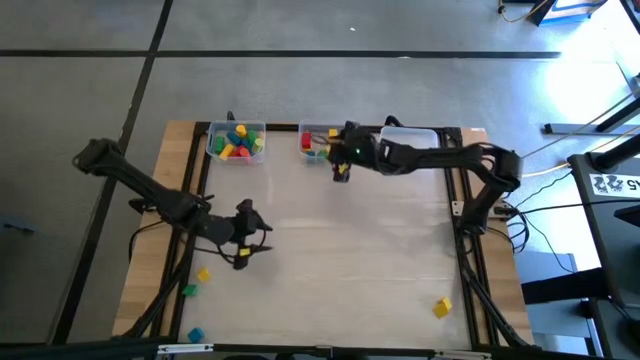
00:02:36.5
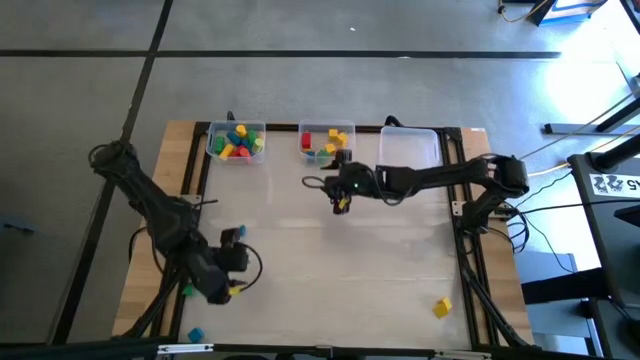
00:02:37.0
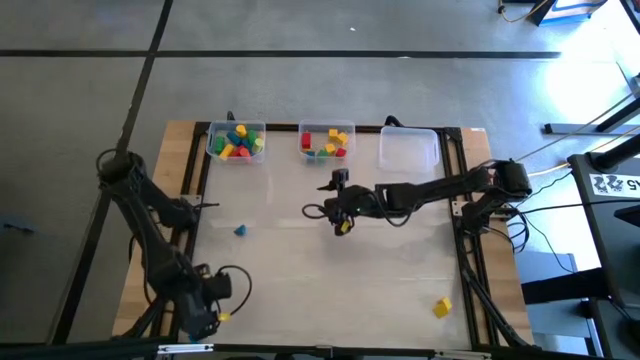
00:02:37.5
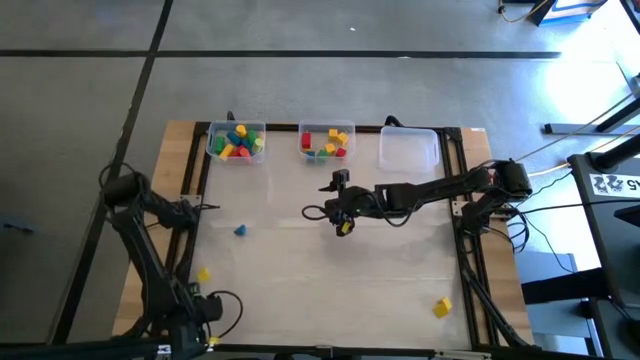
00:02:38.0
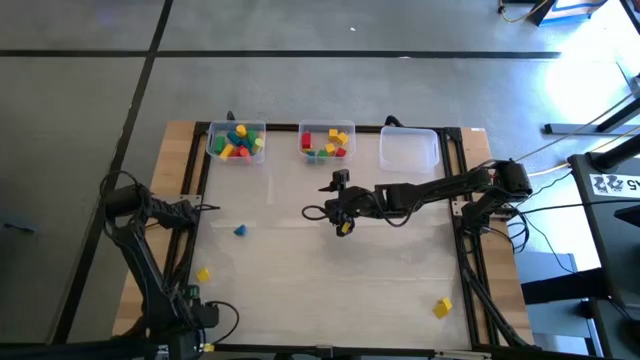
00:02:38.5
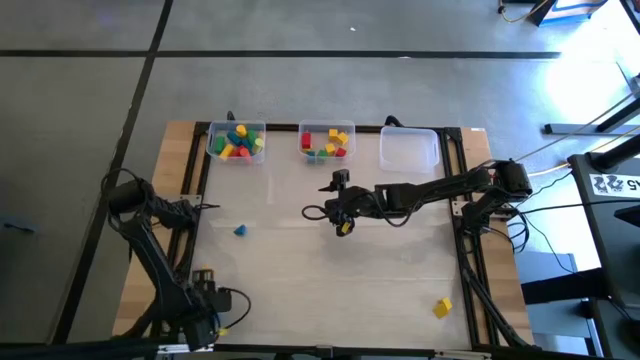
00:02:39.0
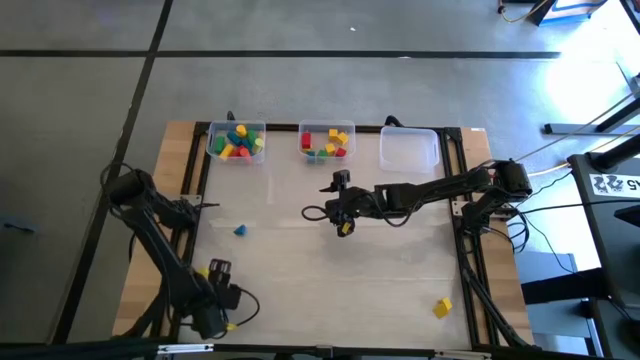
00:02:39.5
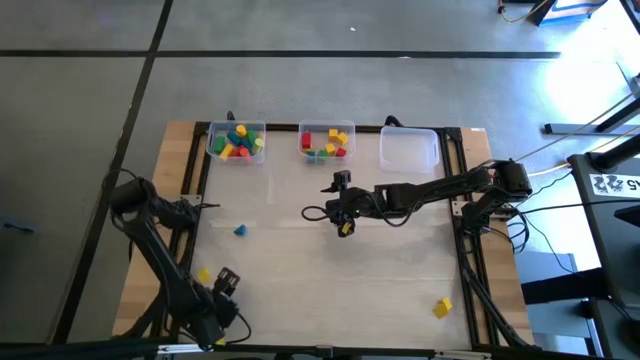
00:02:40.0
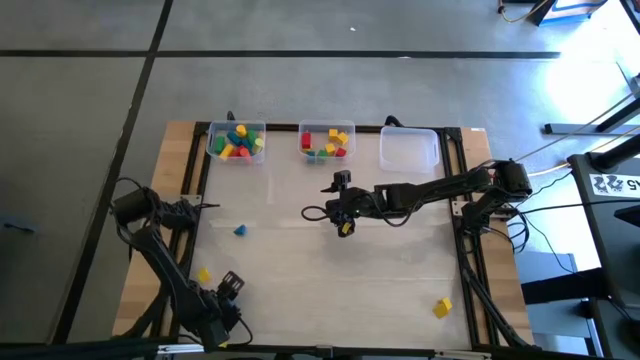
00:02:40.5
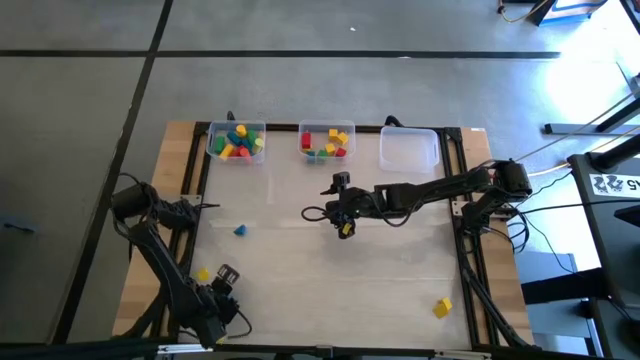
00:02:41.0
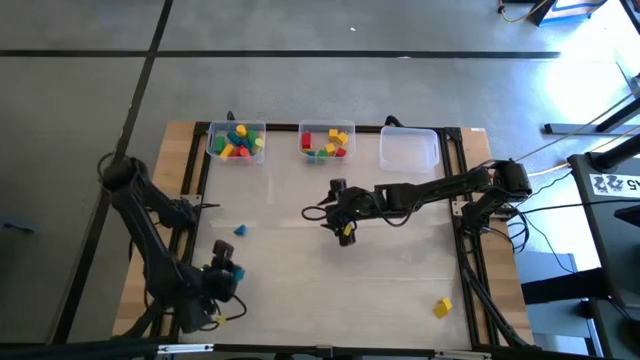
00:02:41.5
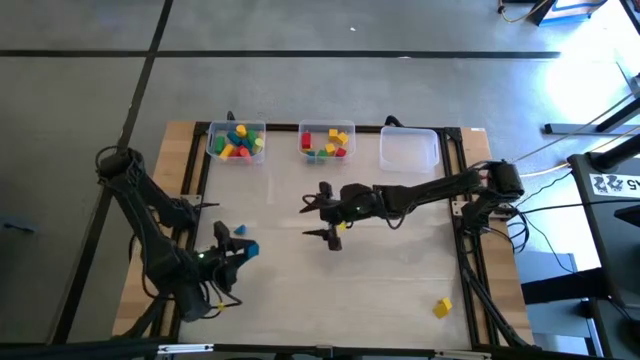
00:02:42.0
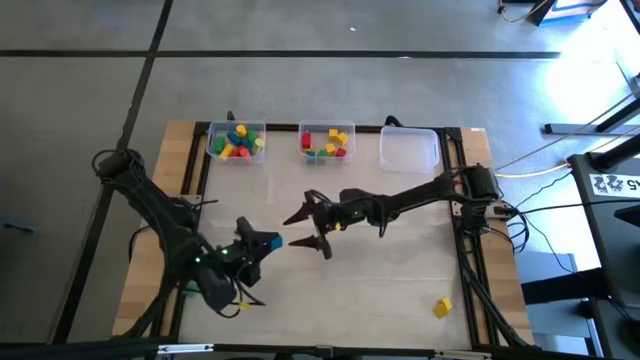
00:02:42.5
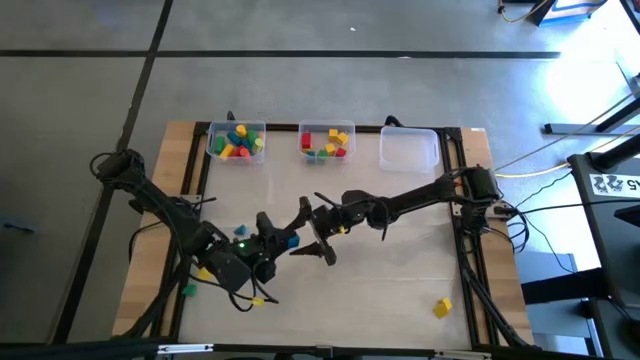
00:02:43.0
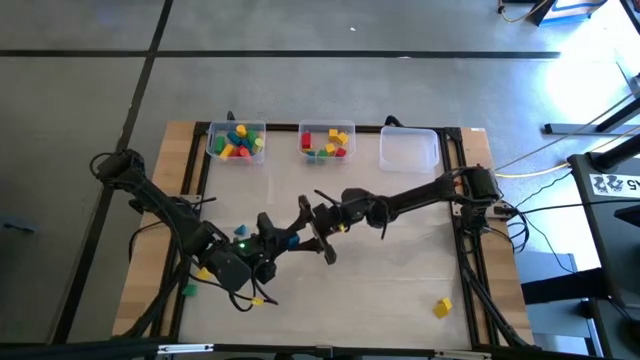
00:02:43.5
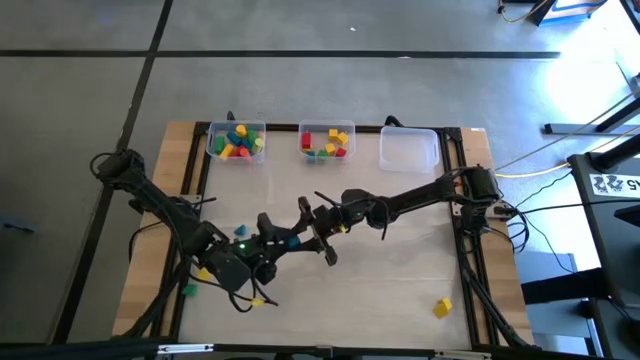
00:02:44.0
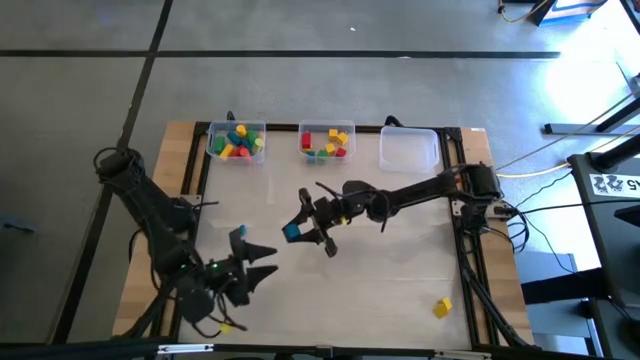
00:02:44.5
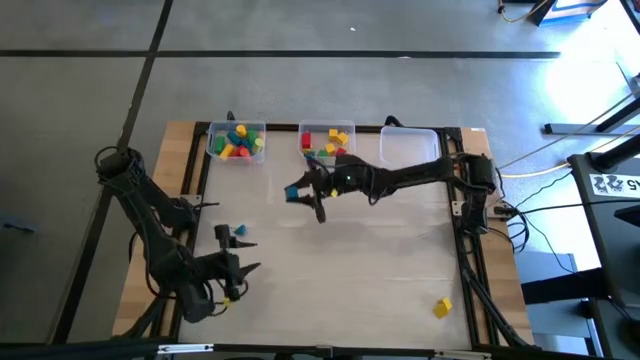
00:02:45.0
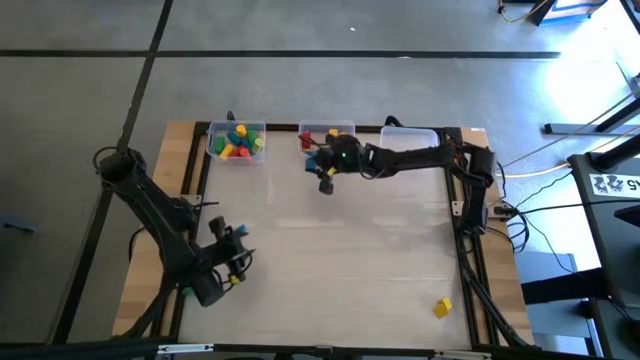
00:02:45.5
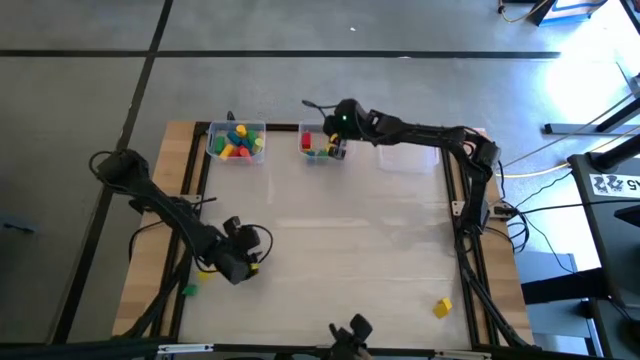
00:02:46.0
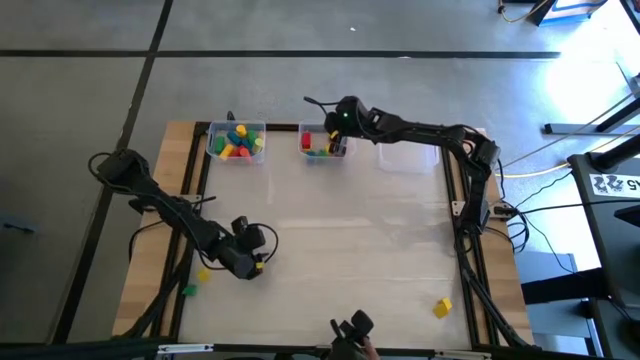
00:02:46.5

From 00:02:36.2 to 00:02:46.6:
Task: Sort blocks by size
Put the square blue block into the middle transparent bin

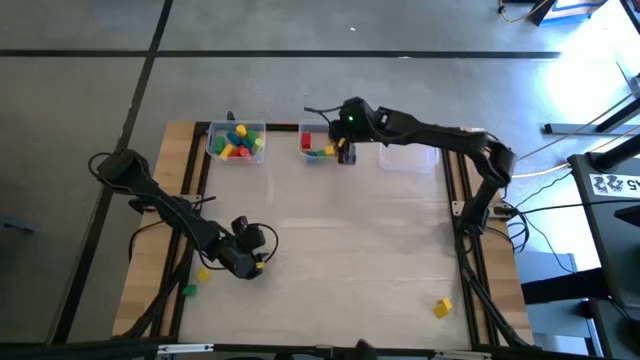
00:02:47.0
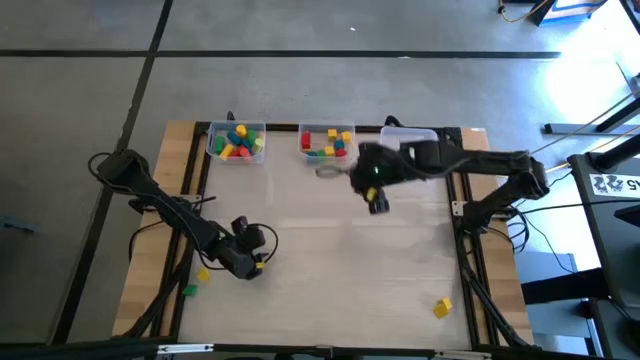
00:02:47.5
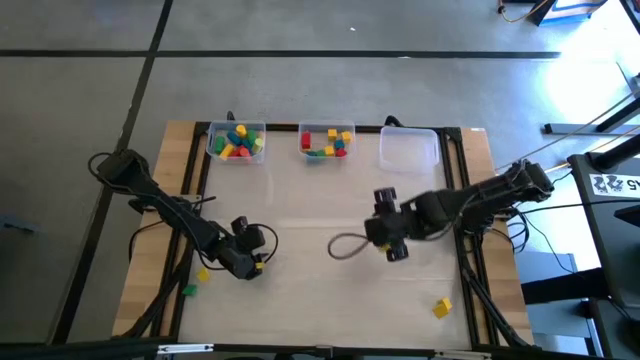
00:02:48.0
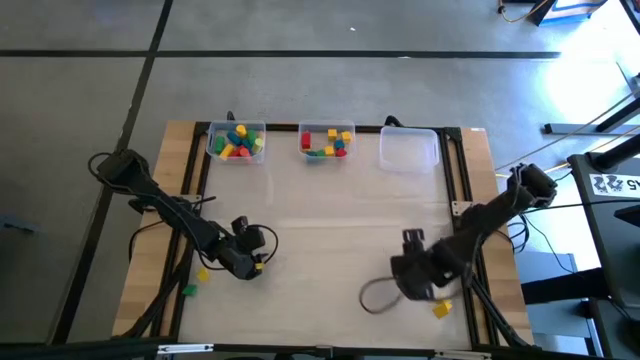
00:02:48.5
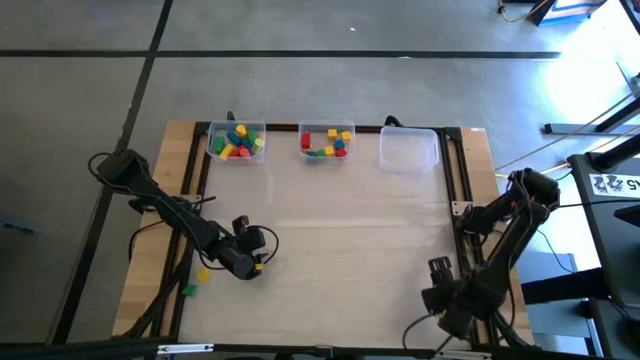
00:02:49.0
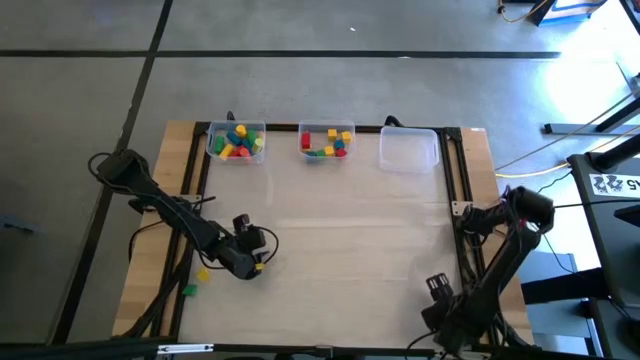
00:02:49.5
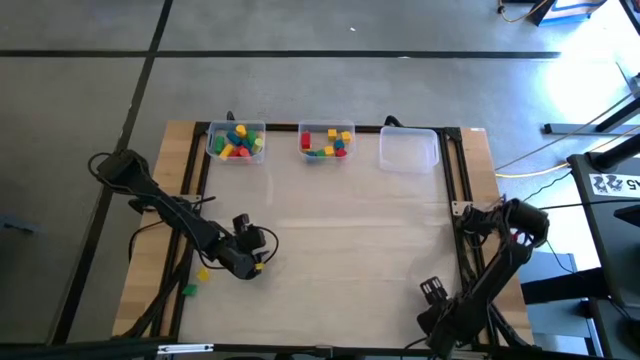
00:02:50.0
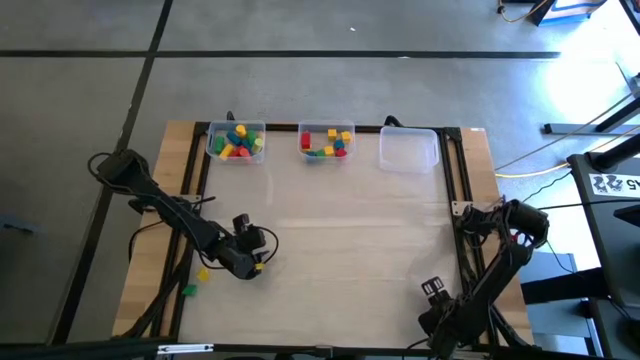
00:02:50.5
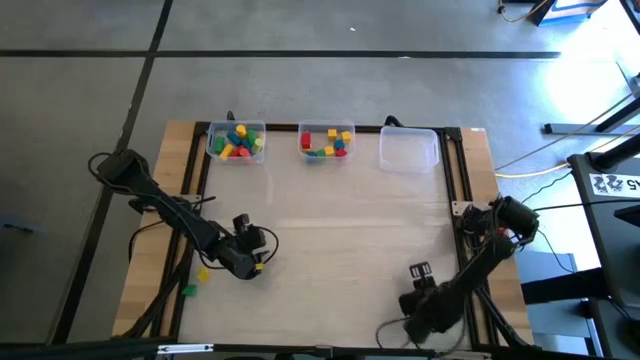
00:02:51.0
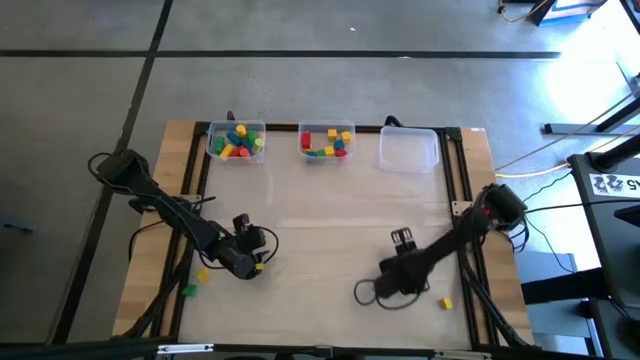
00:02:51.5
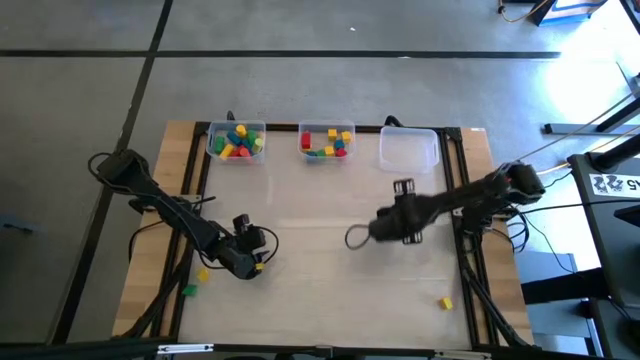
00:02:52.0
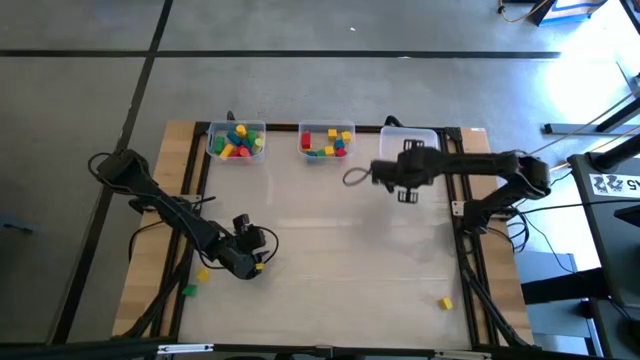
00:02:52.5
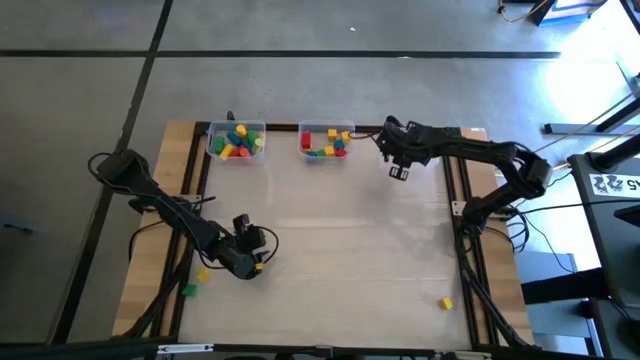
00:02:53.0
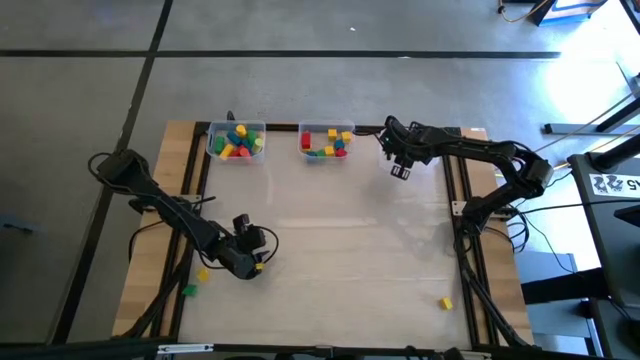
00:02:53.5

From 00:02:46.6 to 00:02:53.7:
Put the triangular yellow block into the right bin

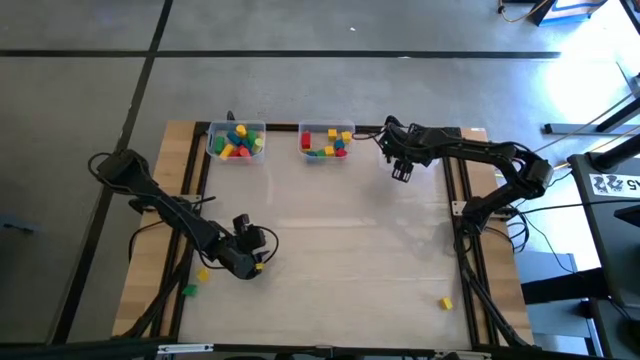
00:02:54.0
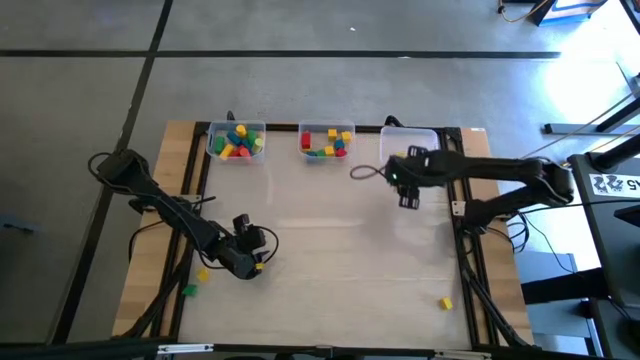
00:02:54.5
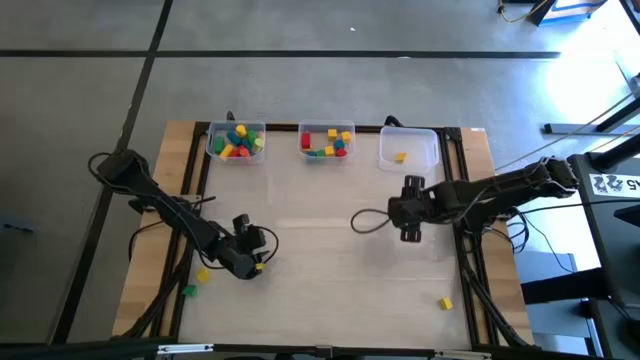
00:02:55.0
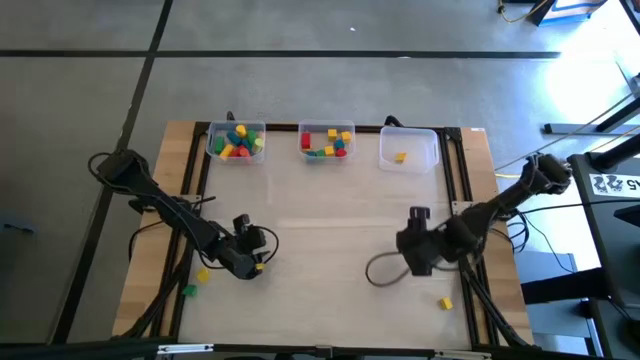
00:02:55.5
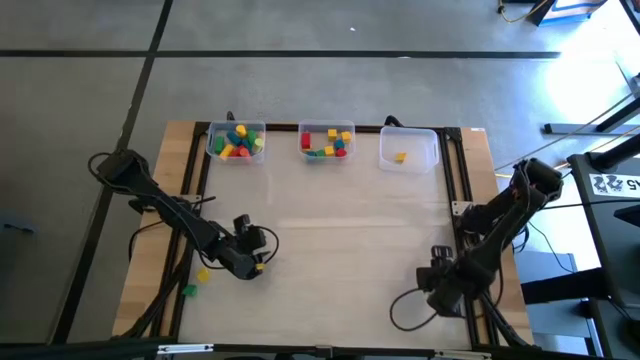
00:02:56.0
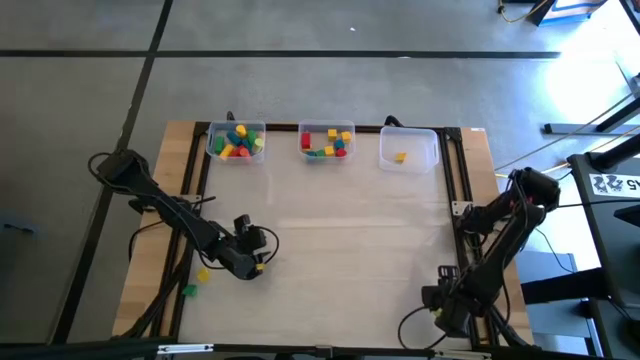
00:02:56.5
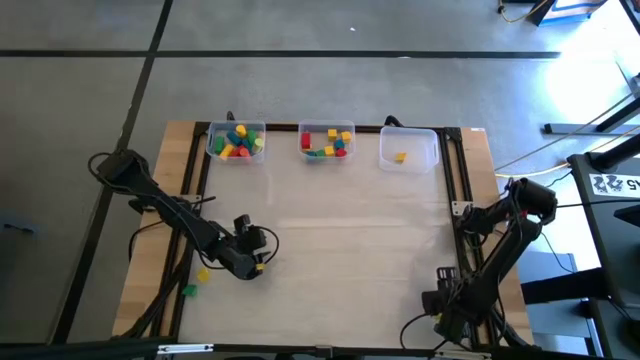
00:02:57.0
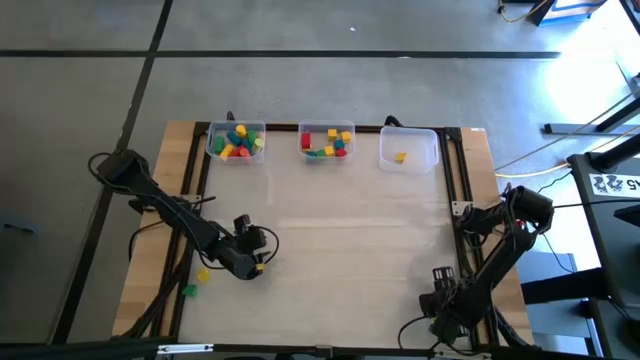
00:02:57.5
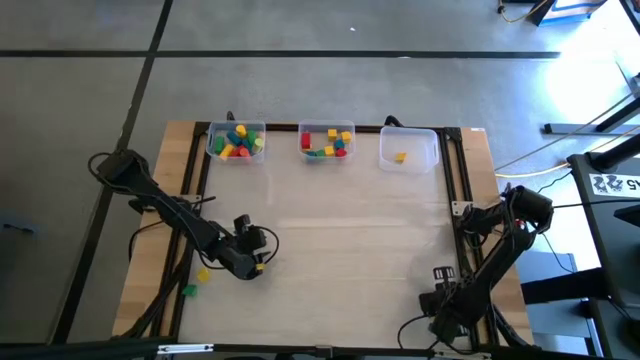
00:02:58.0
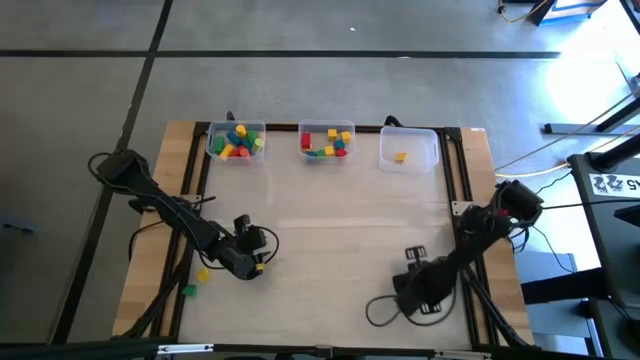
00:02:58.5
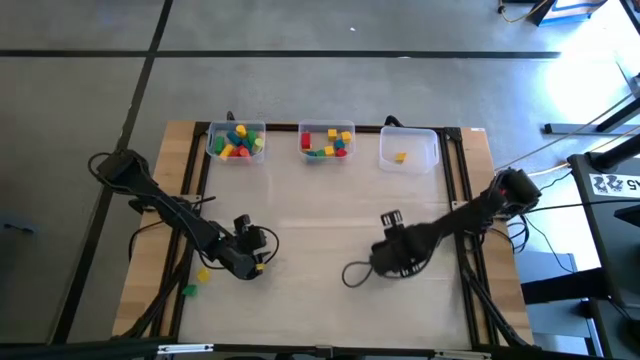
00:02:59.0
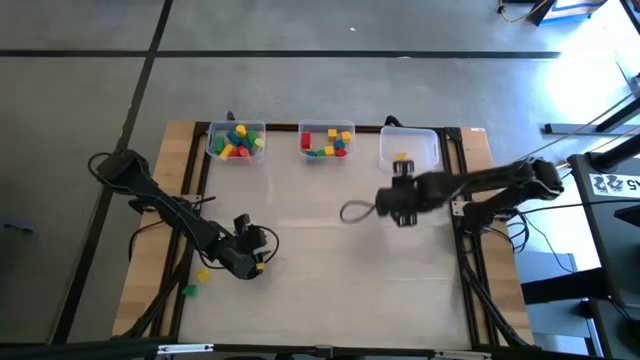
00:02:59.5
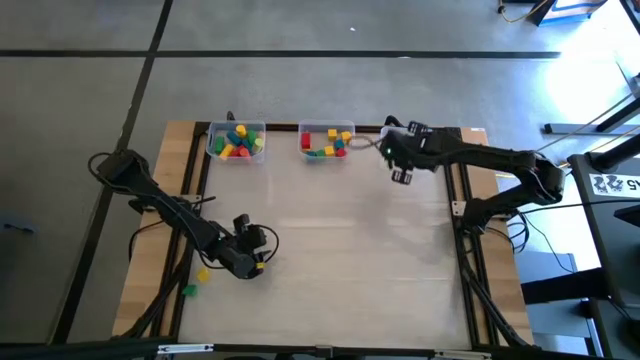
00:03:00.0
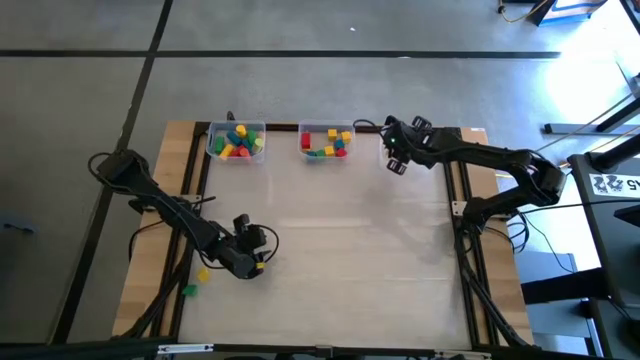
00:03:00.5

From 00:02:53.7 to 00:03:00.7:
Put the triangular yellow block into the right bin
